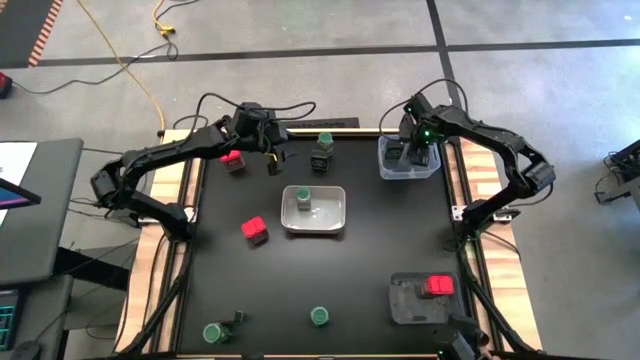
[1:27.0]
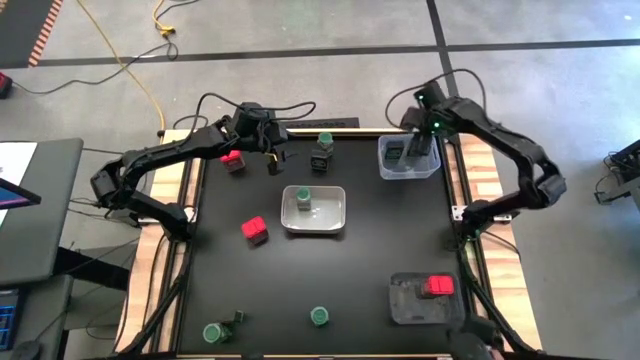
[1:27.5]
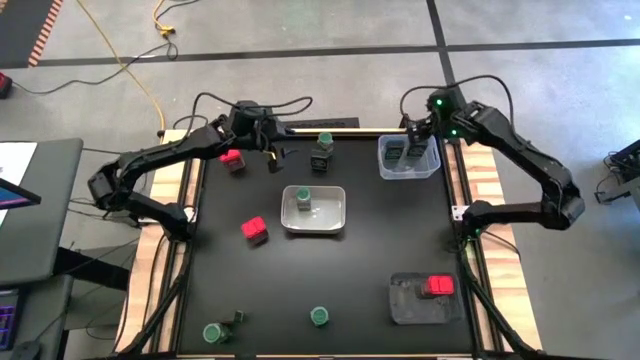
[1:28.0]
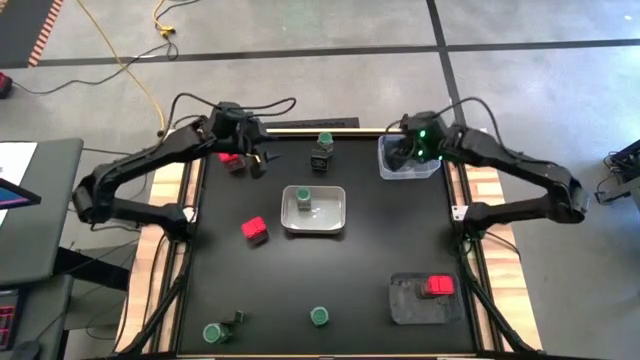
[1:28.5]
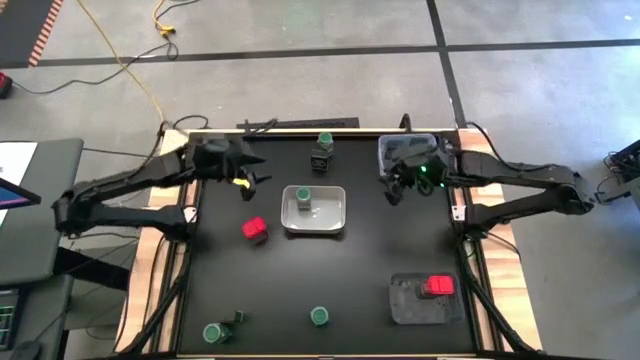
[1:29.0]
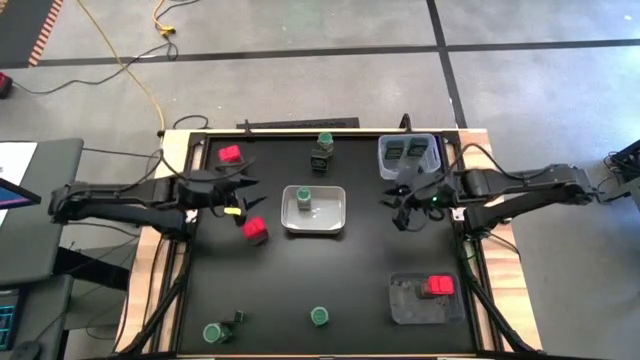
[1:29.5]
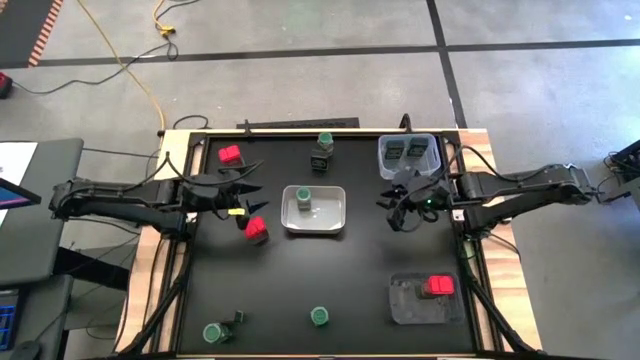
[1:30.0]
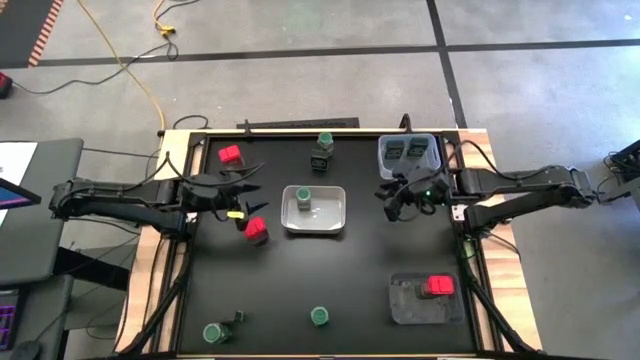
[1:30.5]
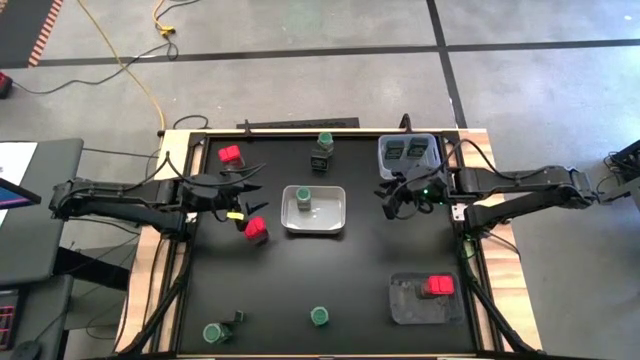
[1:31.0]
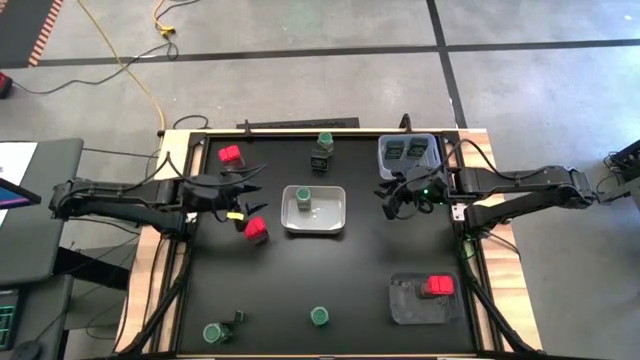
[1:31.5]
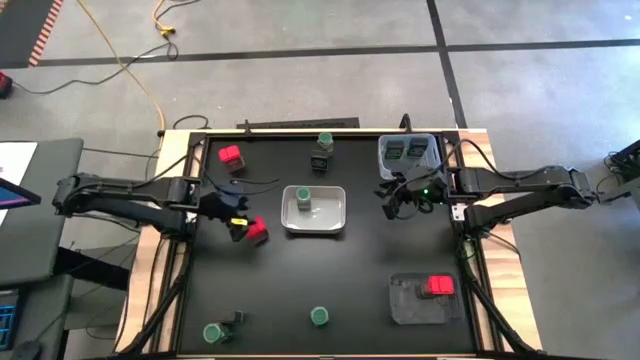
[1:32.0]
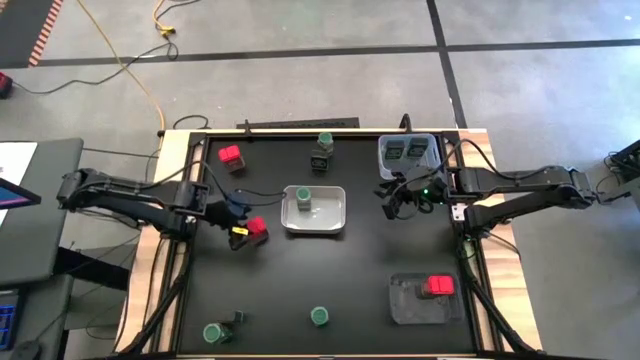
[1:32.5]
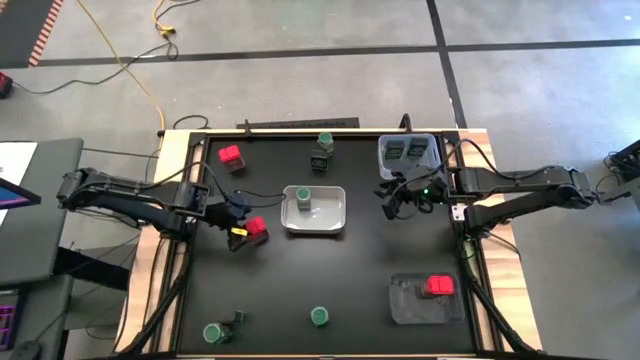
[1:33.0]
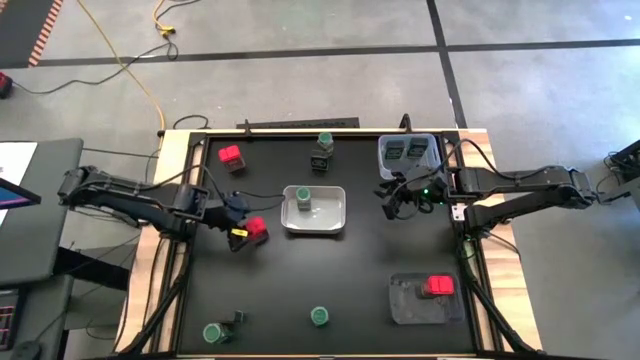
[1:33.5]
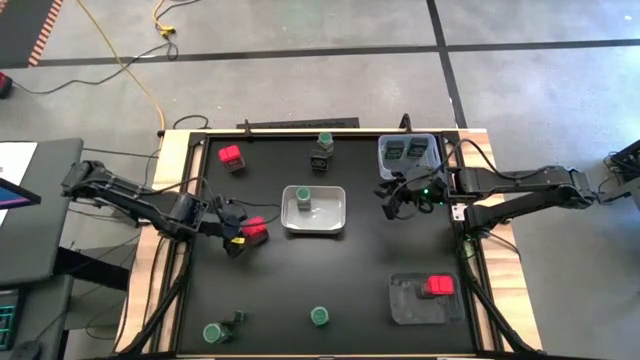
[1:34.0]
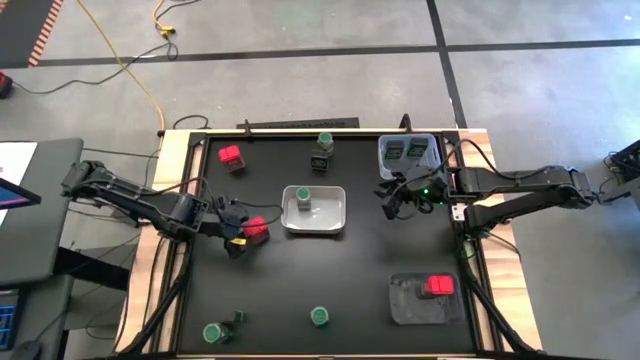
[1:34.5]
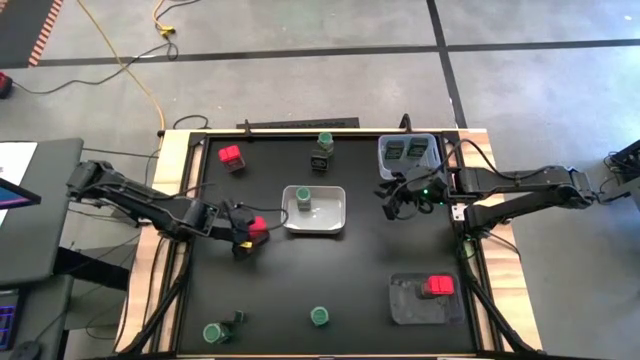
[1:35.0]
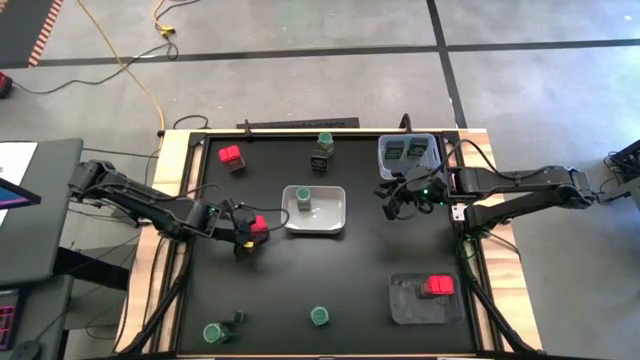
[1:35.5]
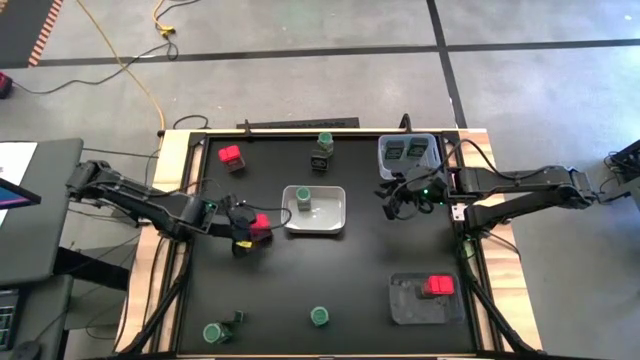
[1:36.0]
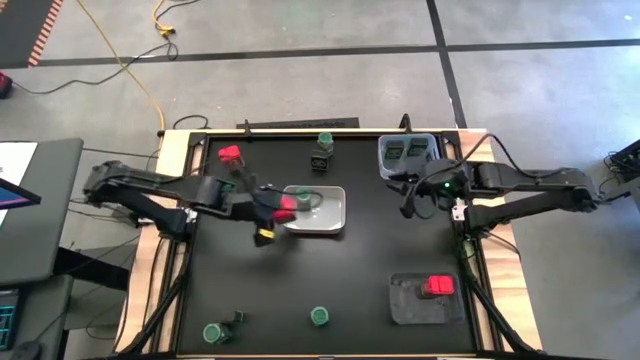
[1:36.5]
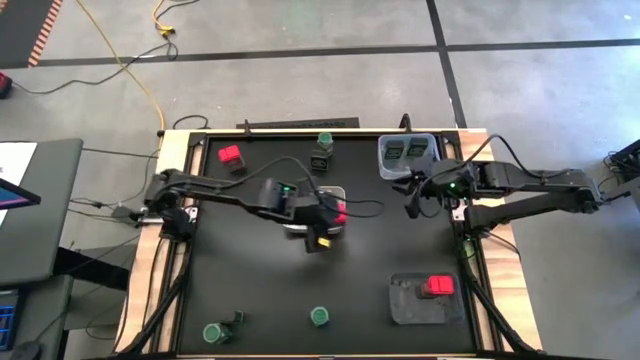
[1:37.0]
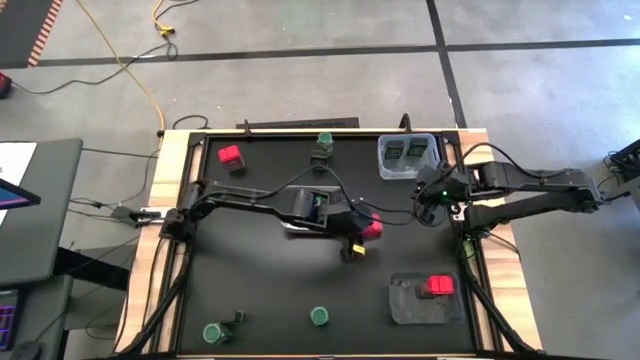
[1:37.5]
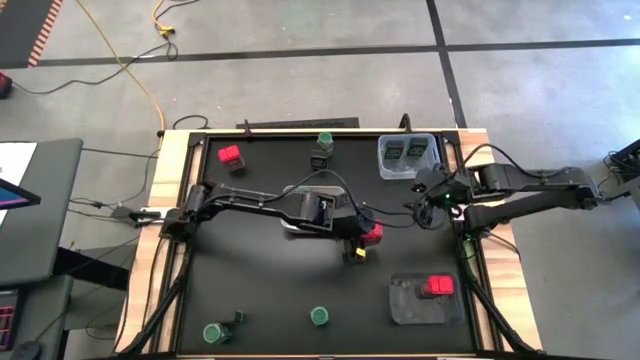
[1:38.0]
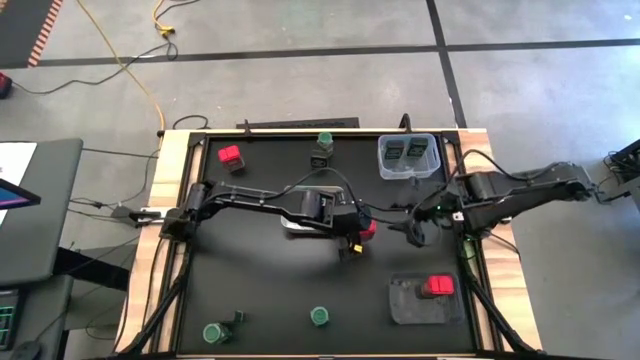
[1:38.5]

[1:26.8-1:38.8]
Task: Sort spices by type
Put the bottom red seasoning can into the black bin

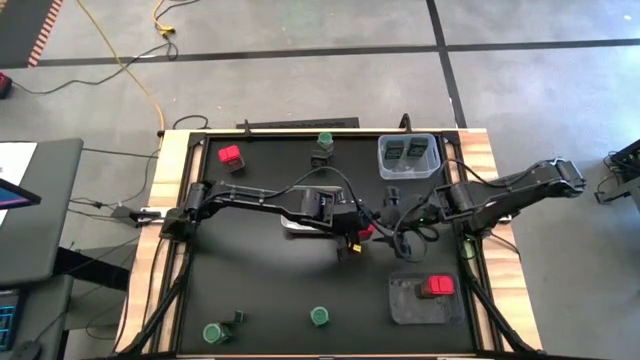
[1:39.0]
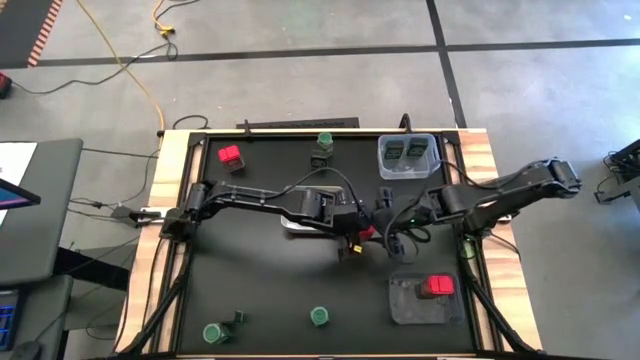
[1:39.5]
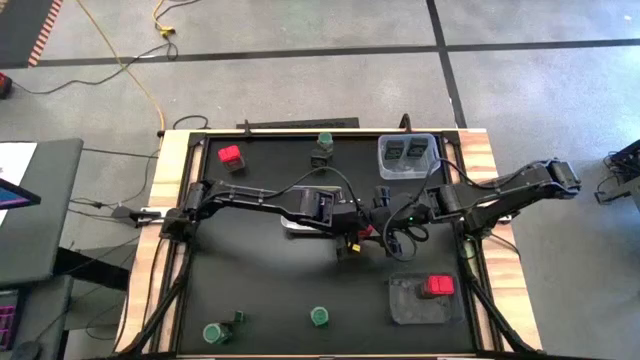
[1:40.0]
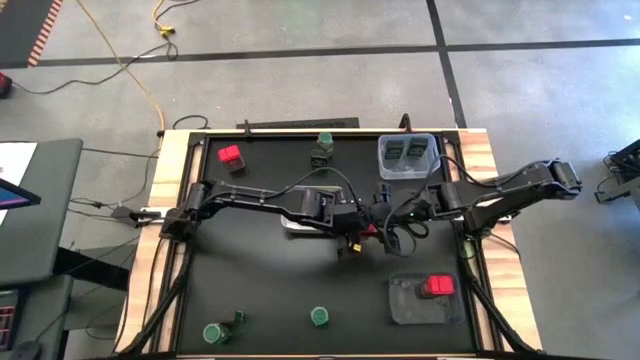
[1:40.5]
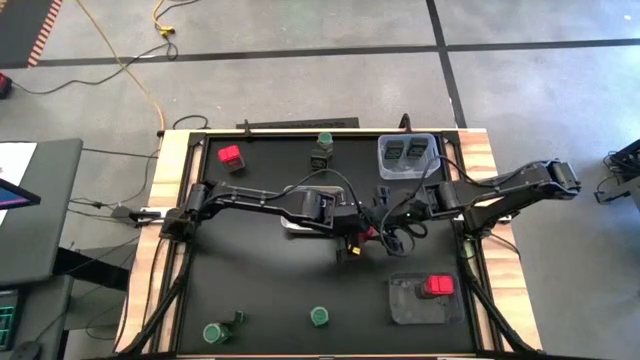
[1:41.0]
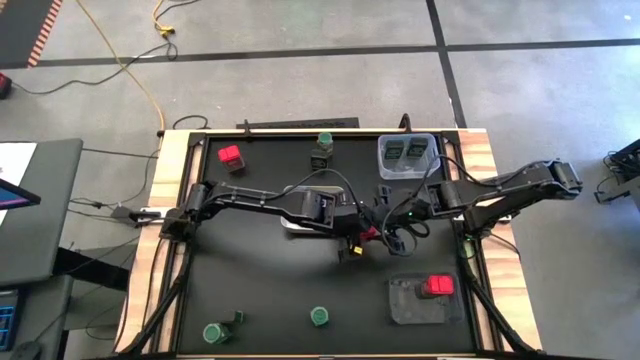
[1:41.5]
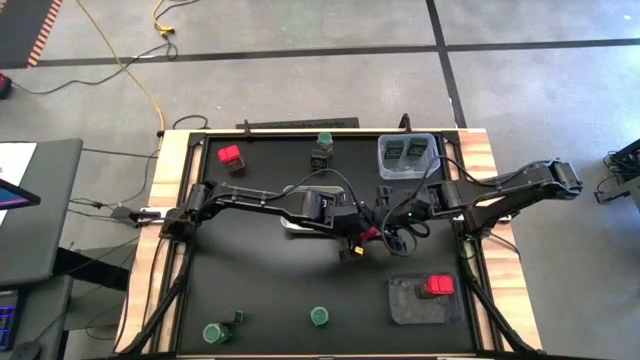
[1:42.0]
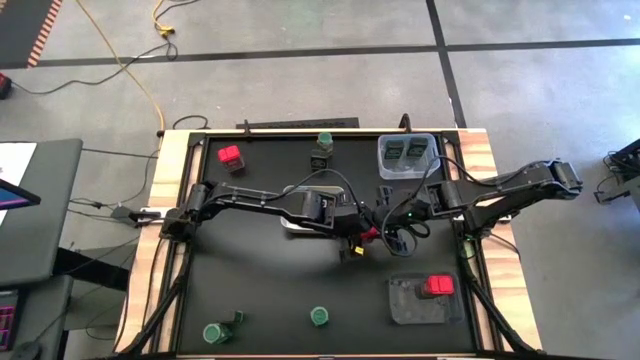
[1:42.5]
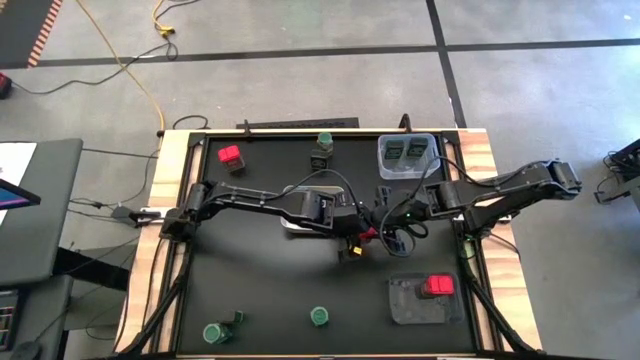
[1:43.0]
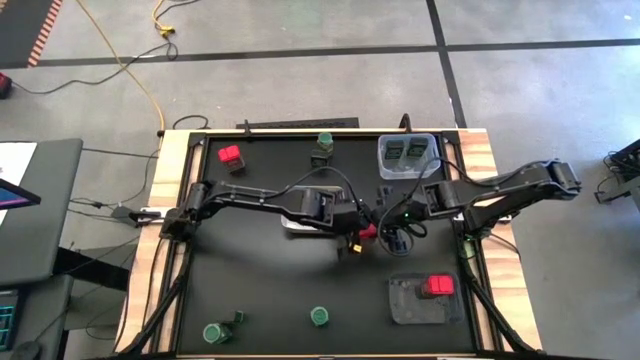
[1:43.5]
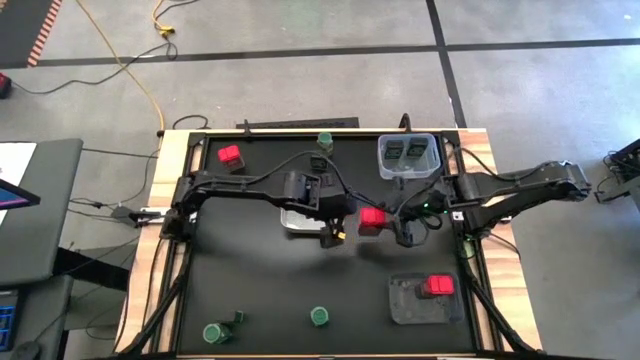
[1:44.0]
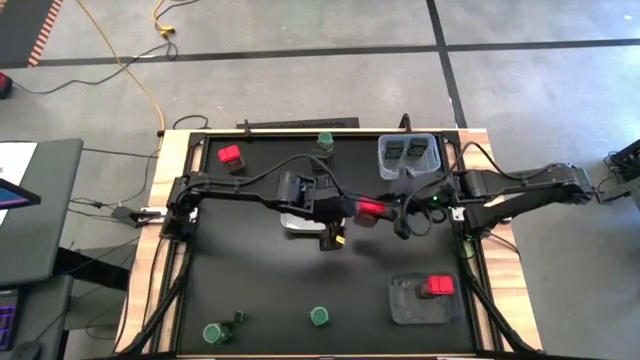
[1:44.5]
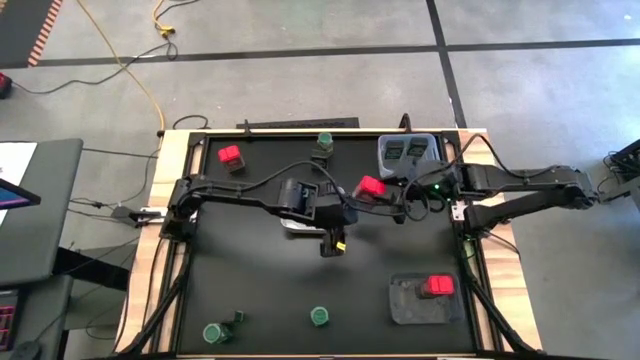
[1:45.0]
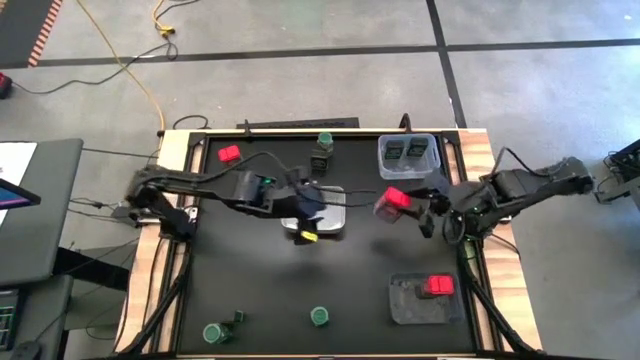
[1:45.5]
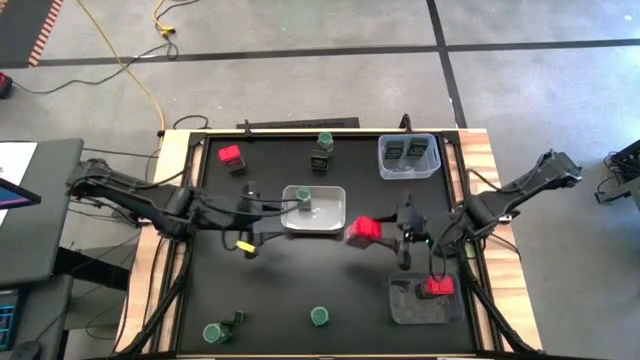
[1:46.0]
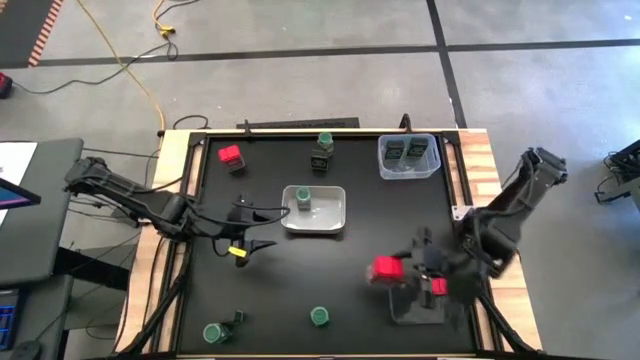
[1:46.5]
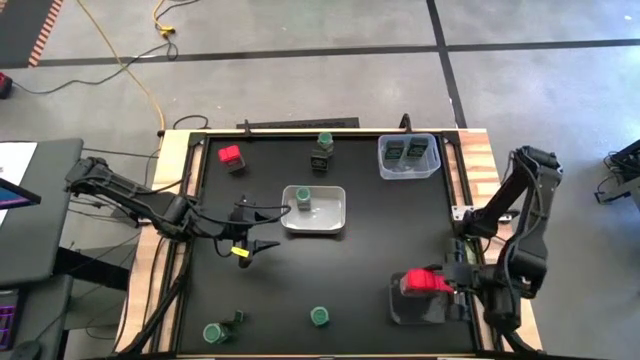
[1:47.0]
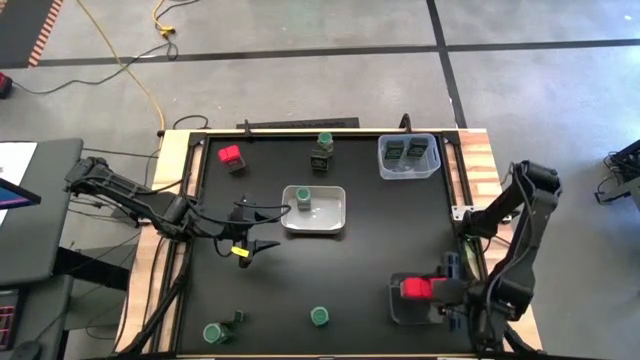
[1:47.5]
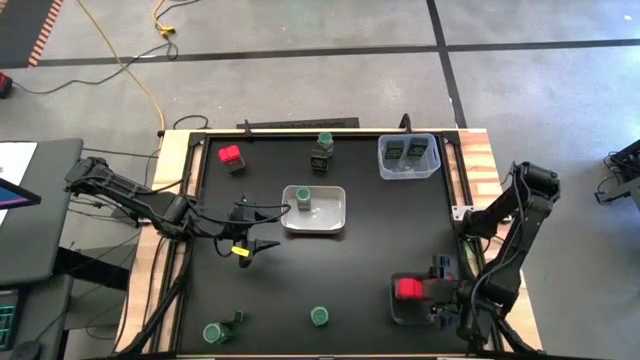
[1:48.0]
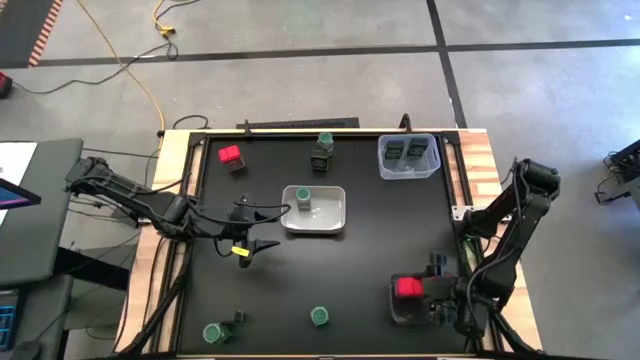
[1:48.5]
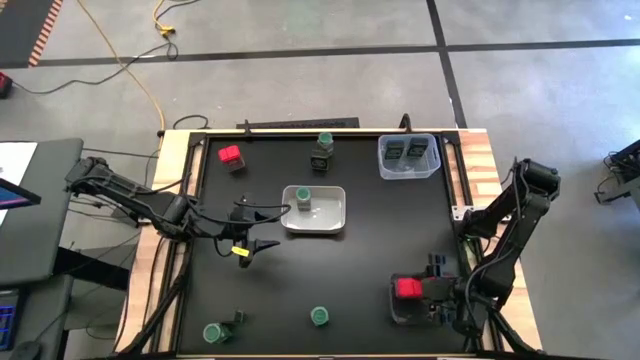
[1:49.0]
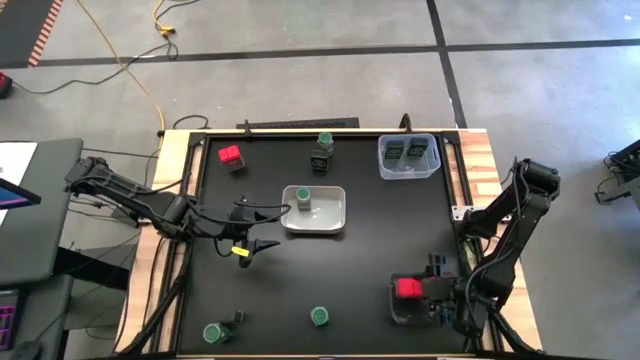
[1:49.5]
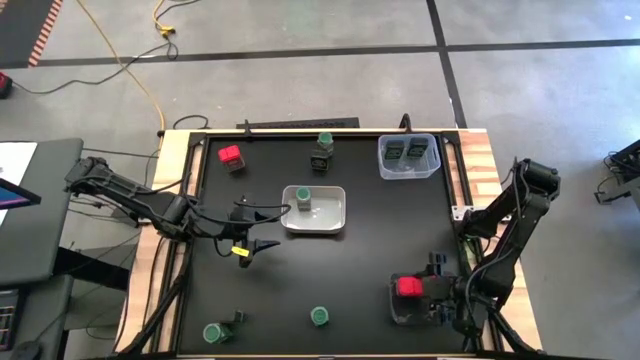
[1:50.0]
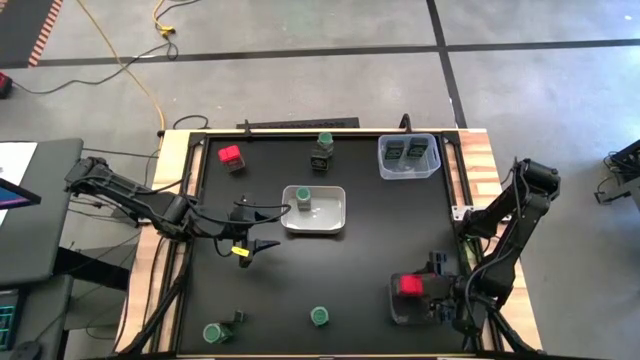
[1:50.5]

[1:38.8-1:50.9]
Put the bottom red seasoning can into the black bin
